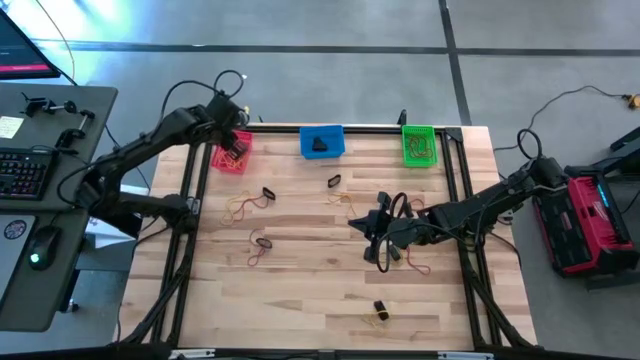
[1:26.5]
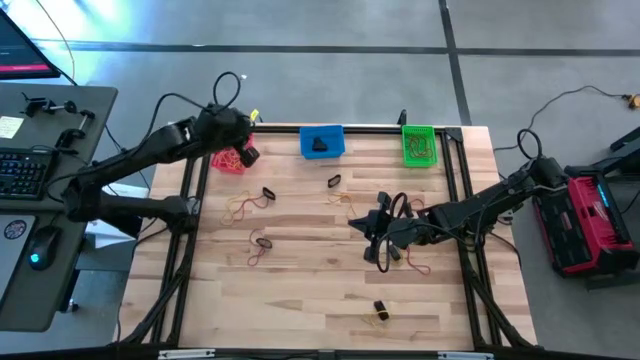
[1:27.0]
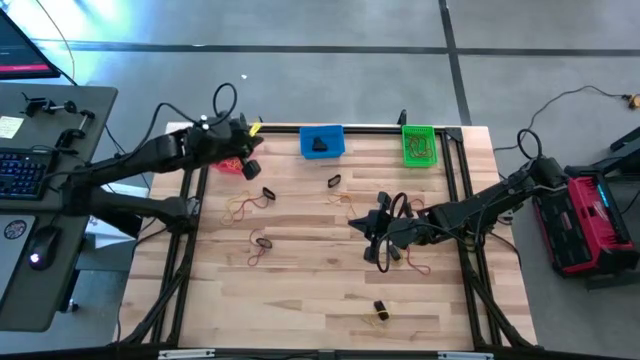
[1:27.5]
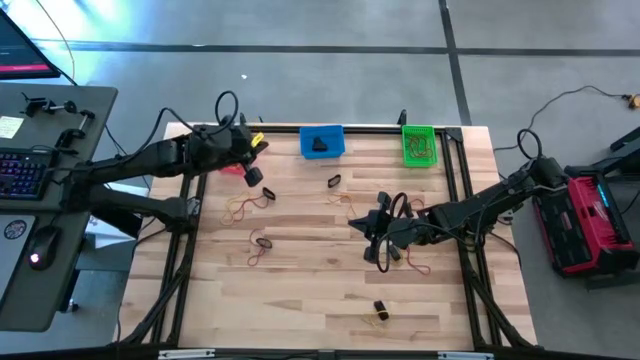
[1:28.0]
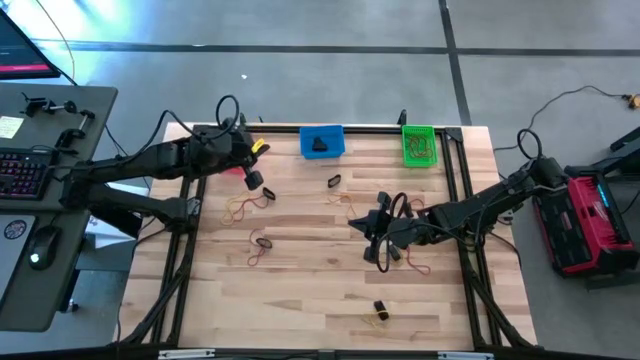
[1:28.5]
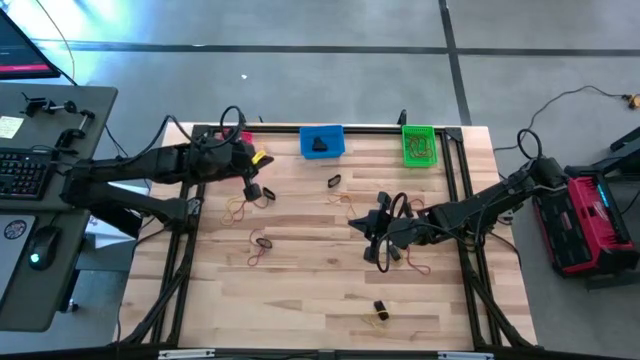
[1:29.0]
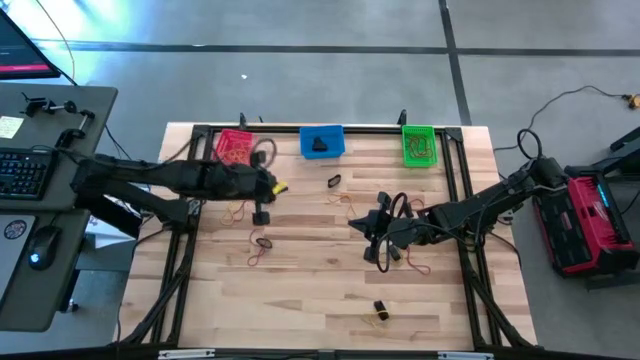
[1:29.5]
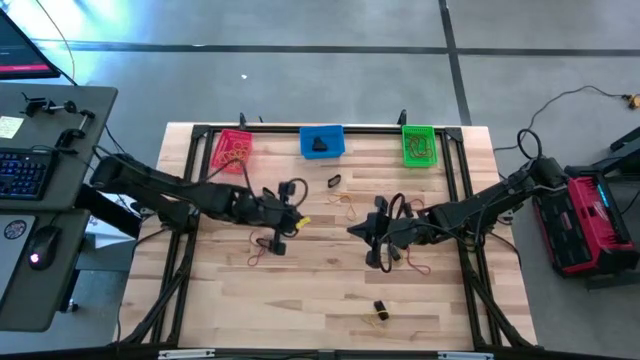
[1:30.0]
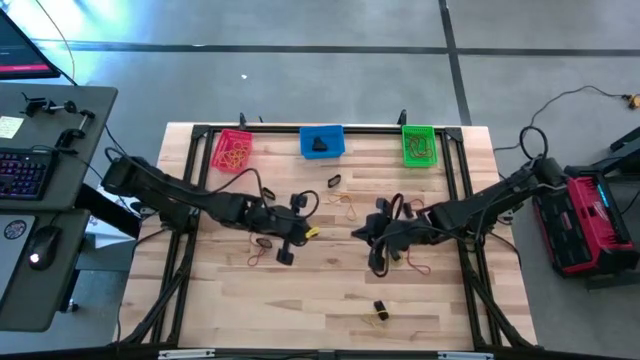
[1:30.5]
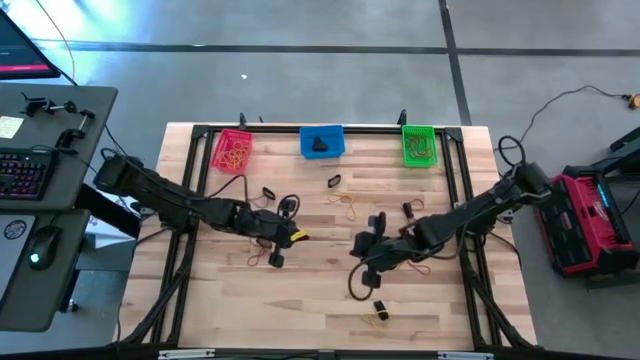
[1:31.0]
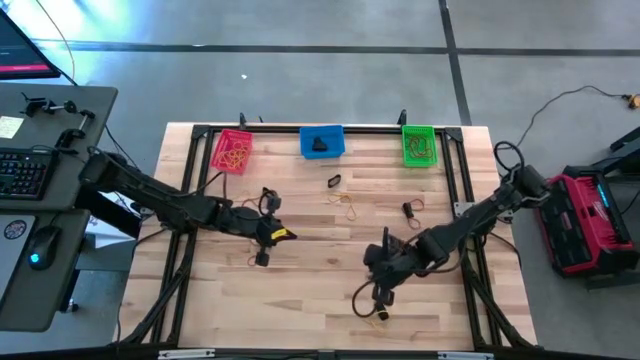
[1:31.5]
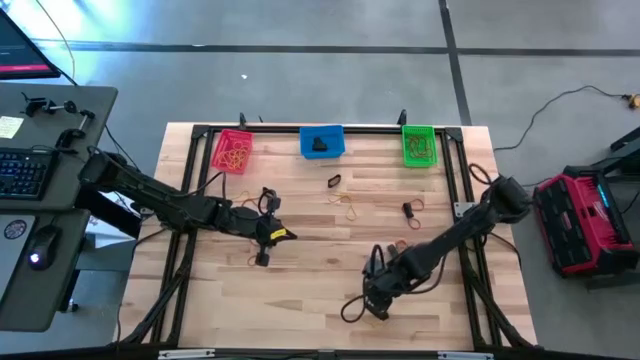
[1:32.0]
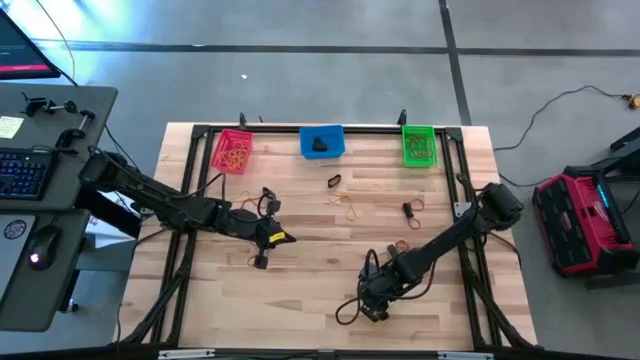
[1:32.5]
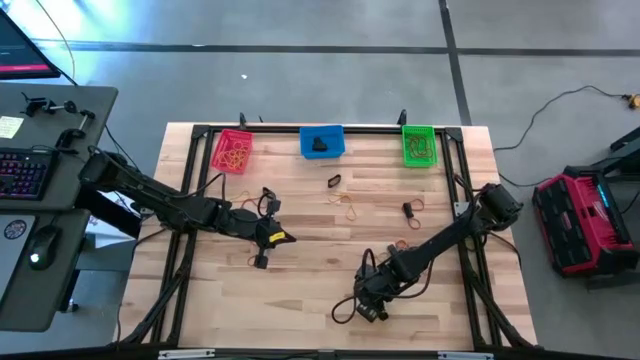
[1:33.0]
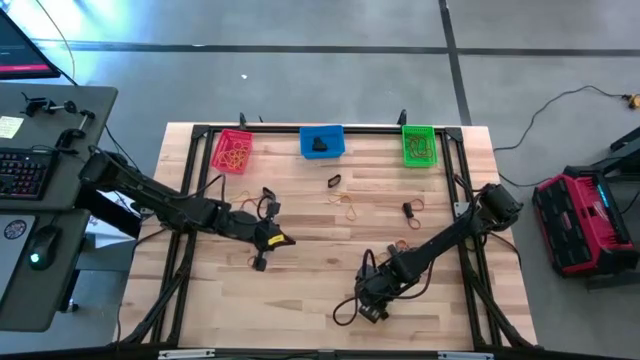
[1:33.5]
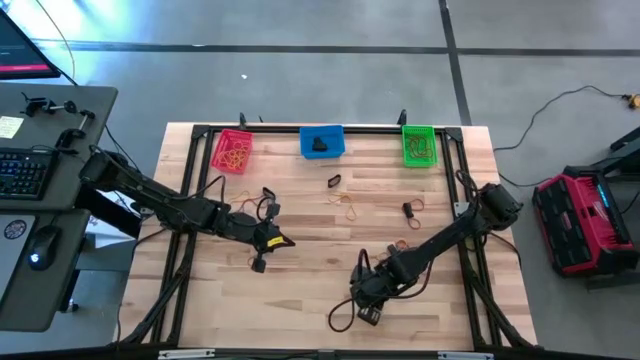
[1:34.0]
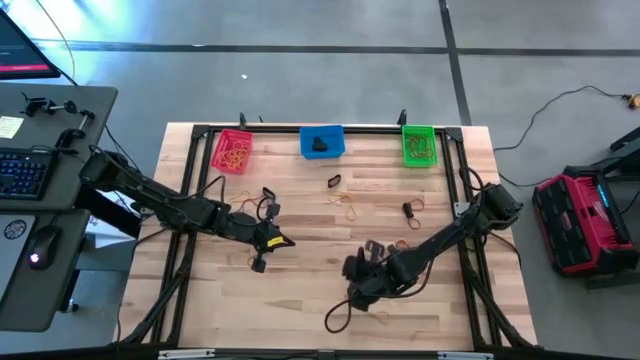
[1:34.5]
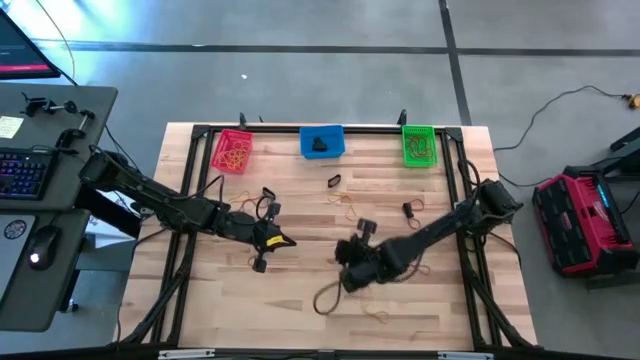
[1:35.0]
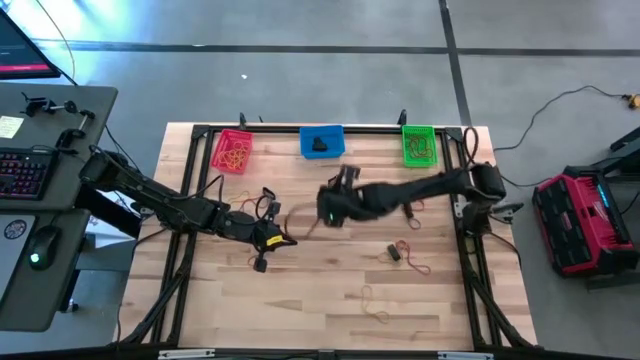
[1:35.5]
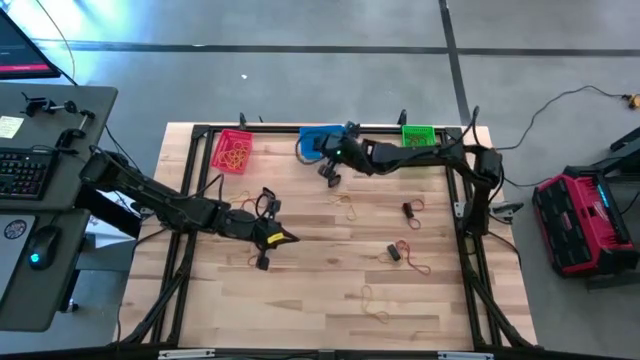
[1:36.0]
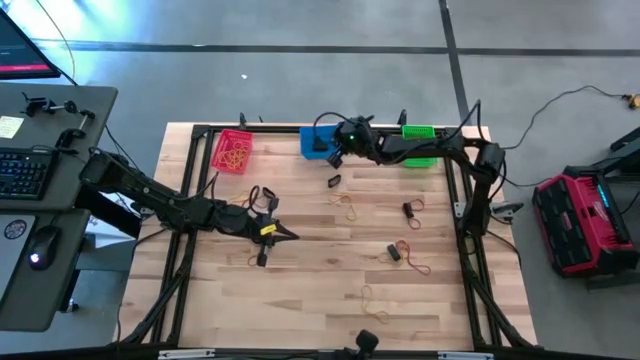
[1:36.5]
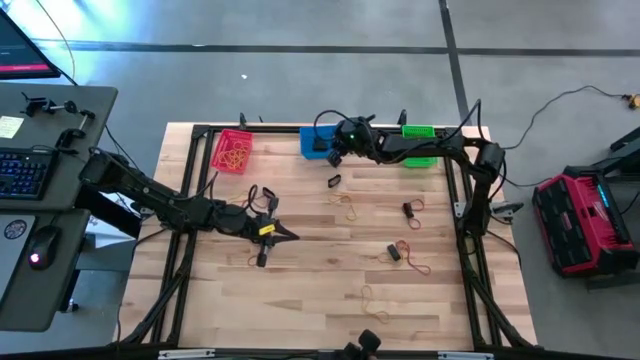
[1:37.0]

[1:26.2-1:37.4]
Task: Sort rubber bands into baskets
Put the black rubber band into the blue bin

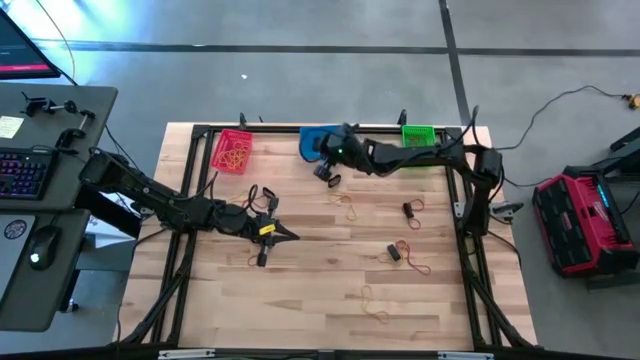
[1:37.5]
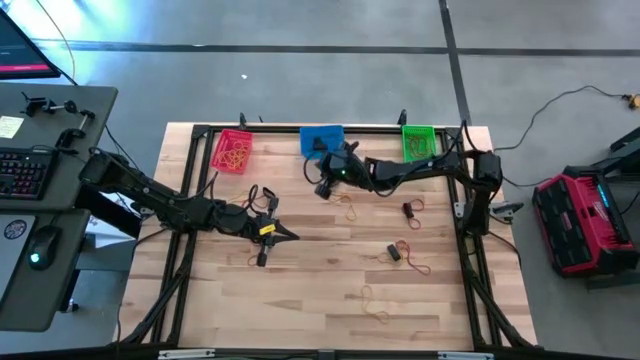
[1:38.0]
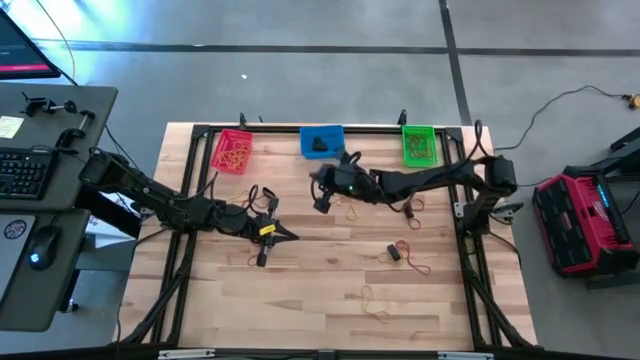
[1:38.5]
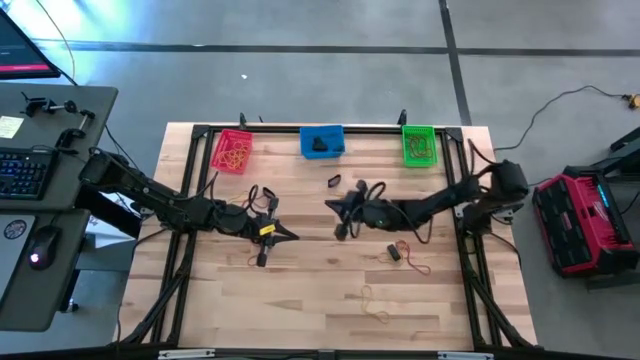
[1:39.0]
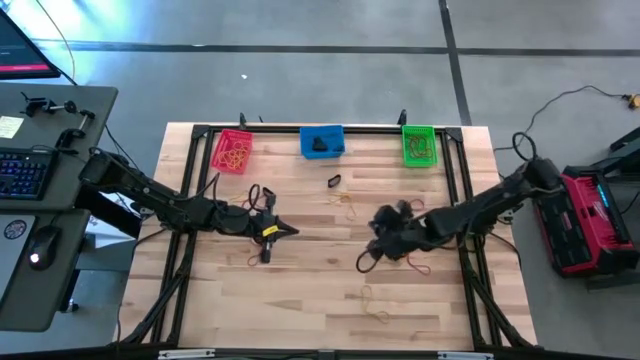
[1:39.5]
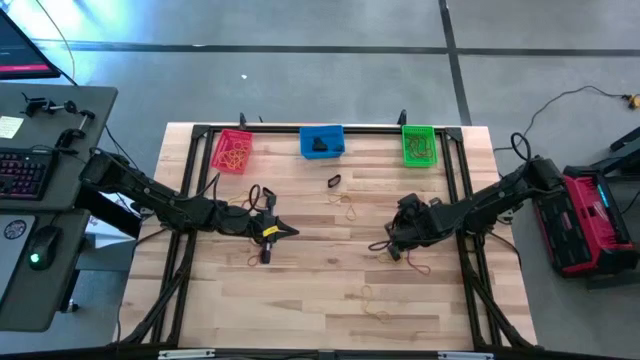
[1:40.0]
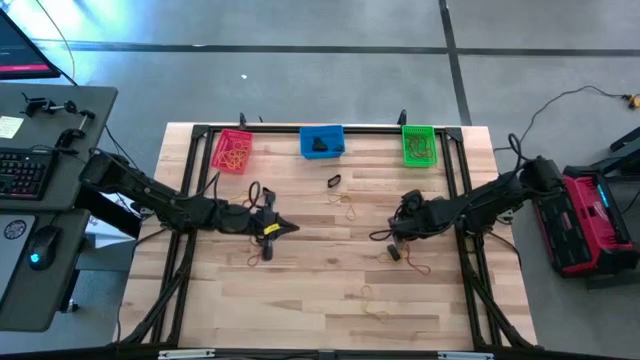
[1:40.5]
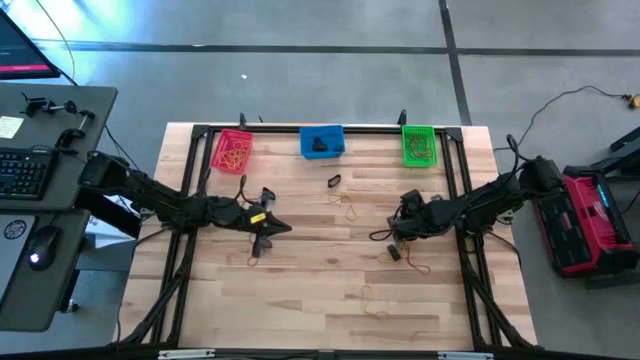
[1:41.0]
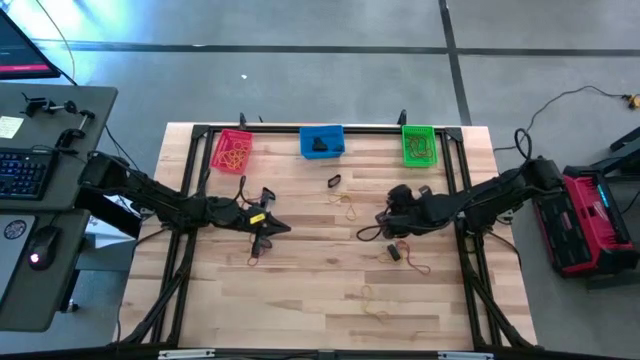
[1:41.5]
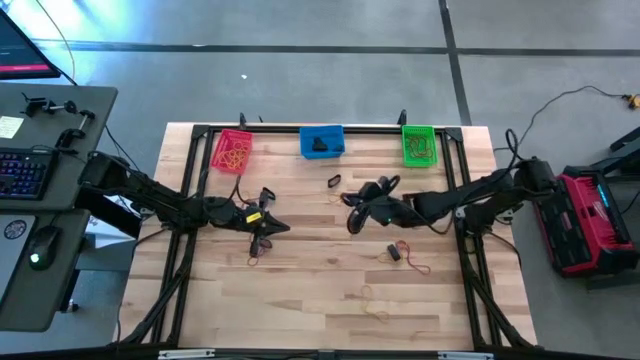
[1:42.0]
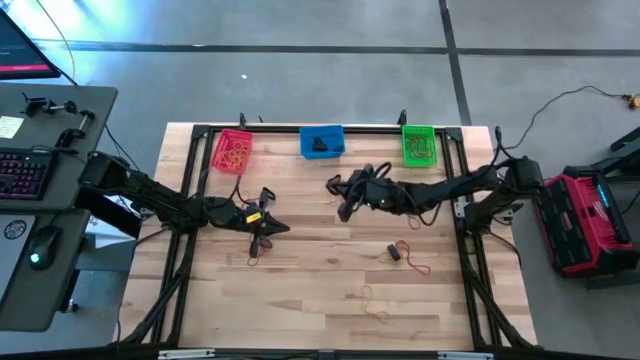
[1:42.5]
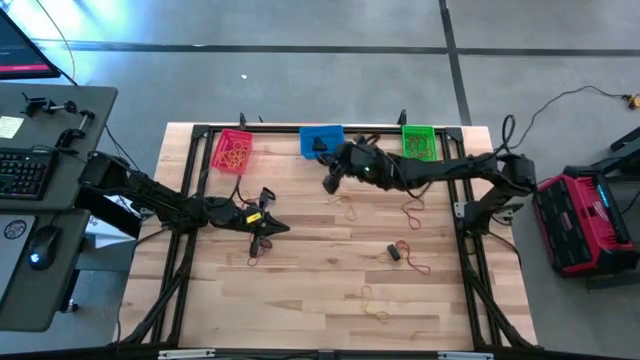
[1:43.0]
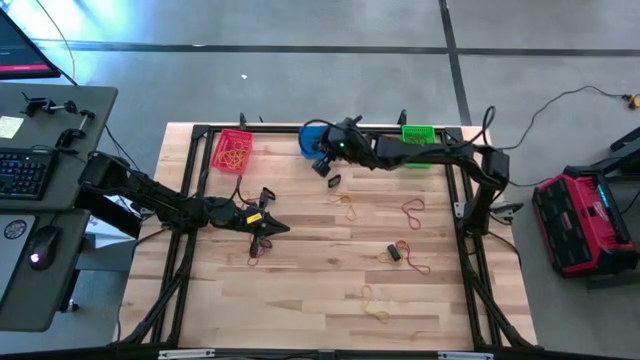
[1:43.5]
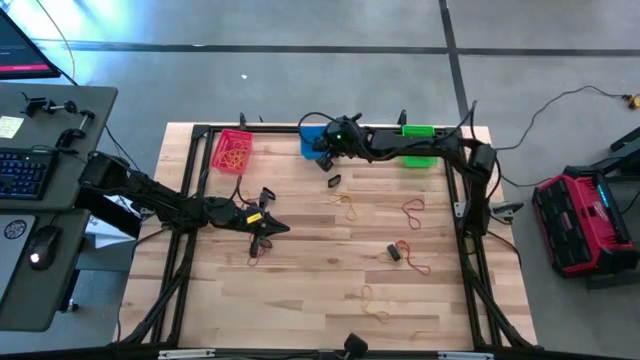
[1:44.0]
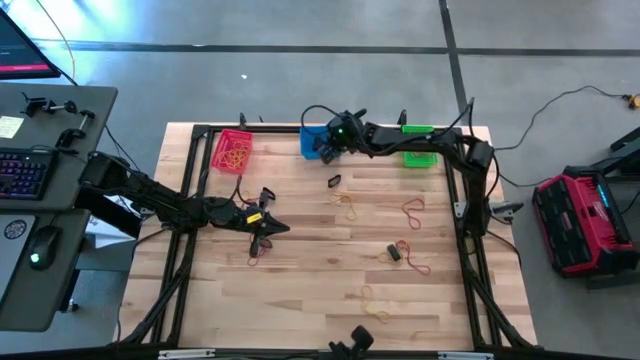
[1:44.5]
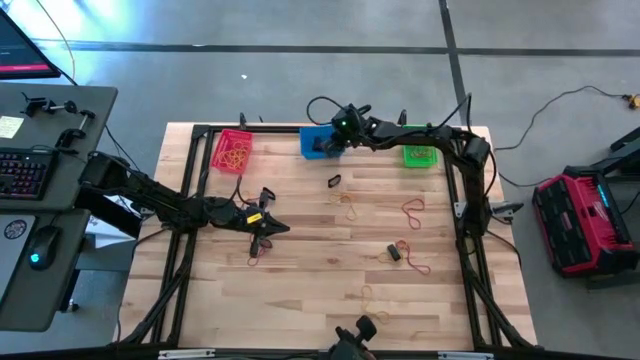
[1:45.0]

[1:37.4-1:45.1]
Put the black rubber band into the blue bin

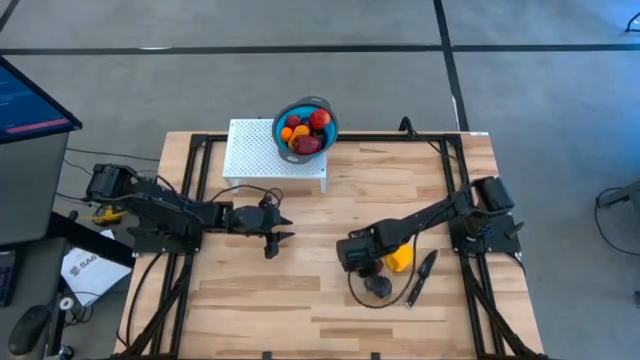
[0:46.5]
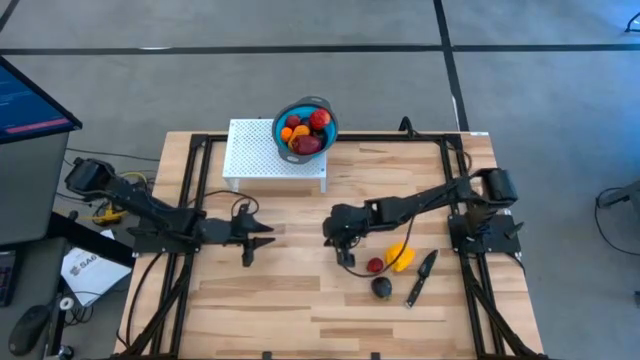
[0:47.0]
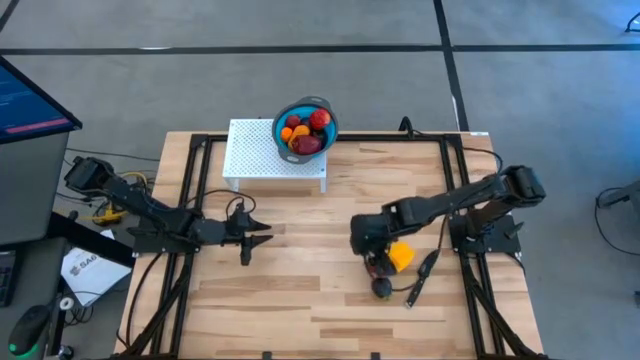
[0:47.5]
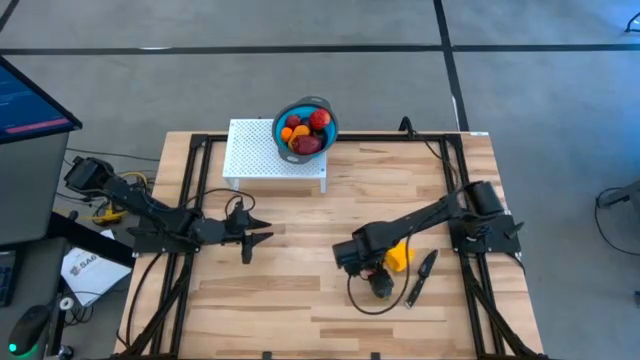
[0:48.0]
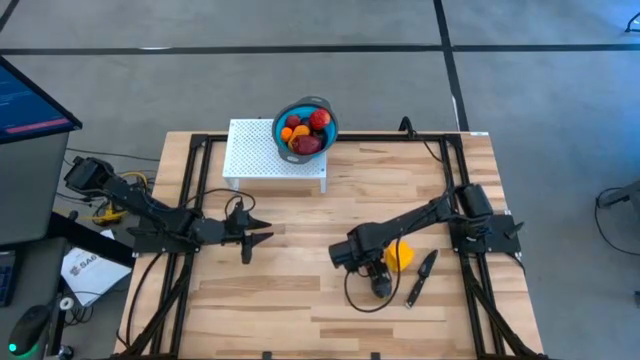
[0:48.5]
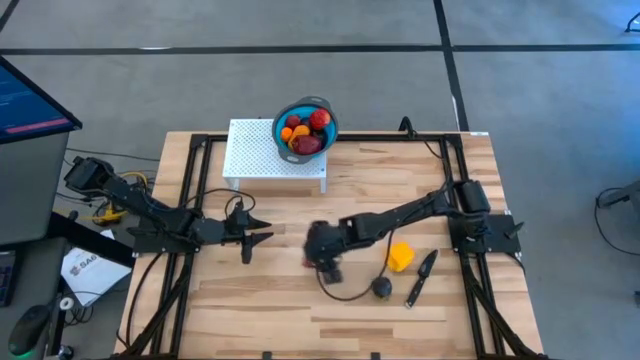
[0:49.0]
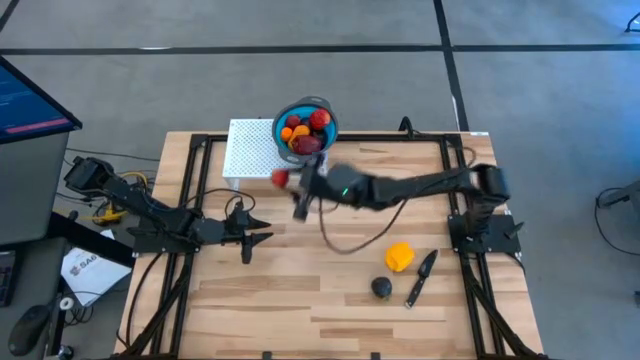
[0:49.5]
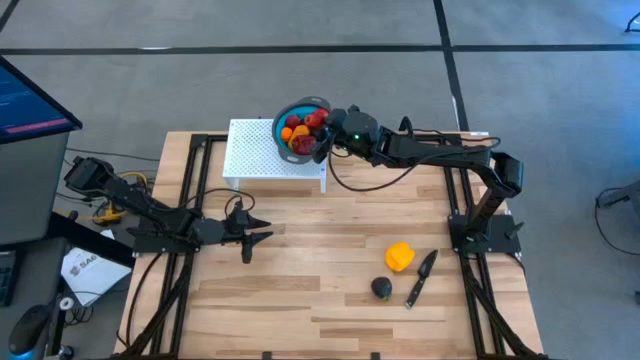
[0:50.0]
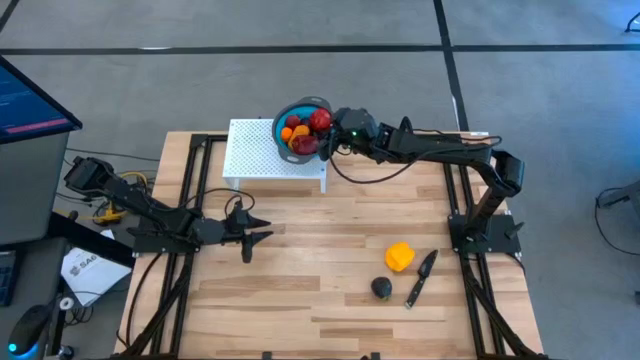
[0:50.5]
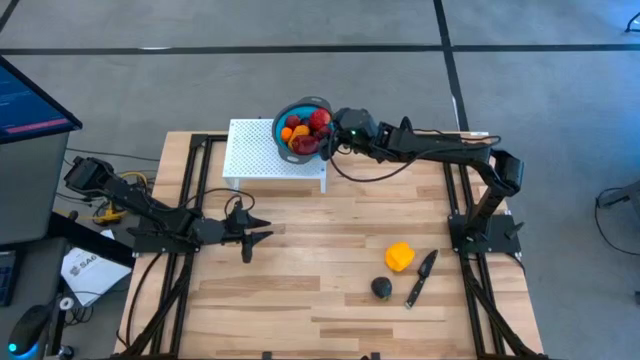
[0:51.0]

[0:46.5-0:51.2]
Task: Pick & Place Fruit
Put the red pomegranate into the blue strainer bowl
